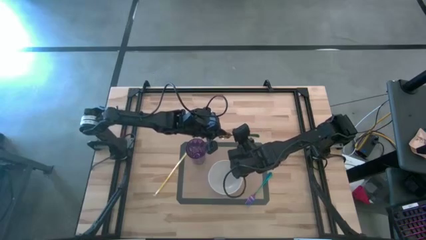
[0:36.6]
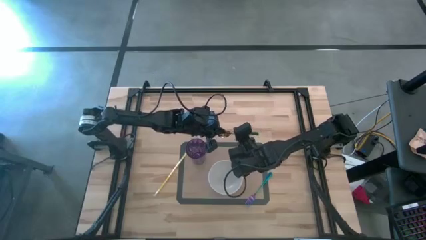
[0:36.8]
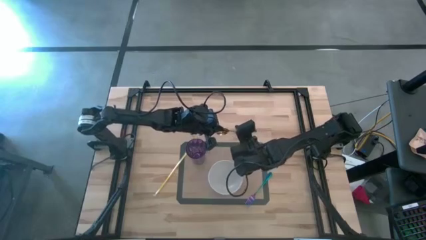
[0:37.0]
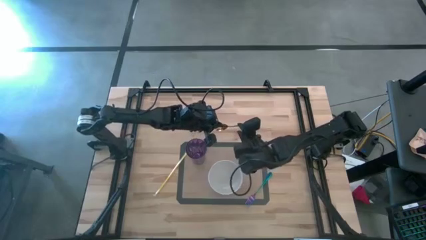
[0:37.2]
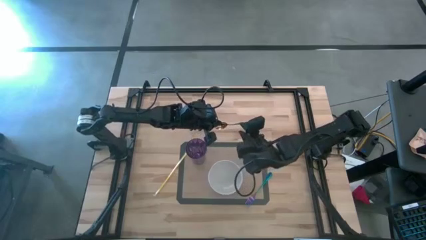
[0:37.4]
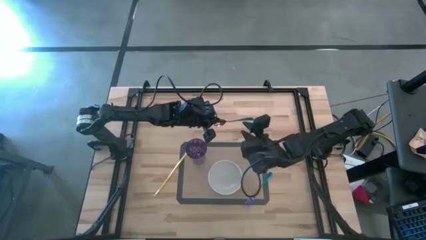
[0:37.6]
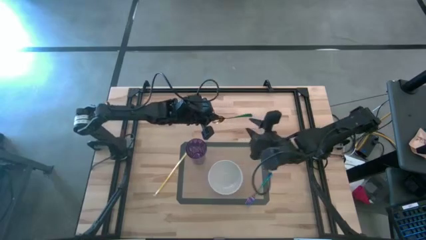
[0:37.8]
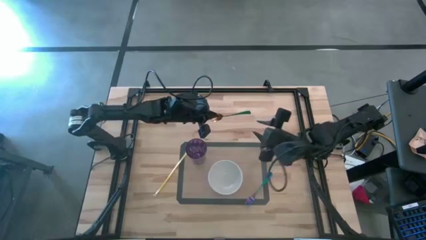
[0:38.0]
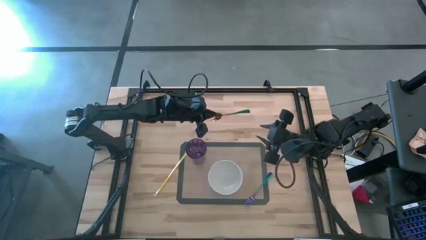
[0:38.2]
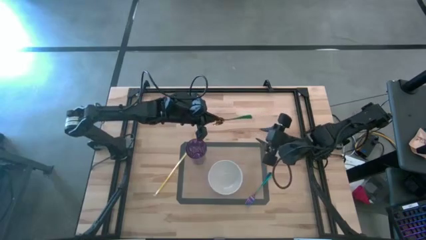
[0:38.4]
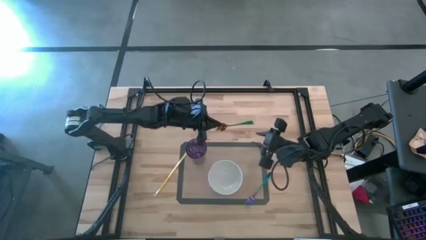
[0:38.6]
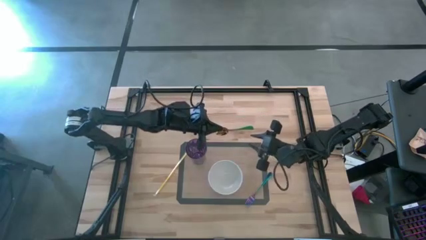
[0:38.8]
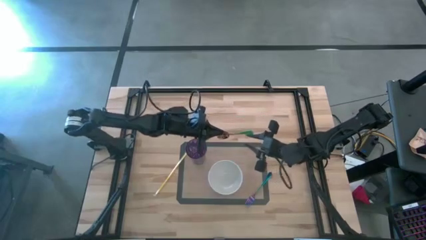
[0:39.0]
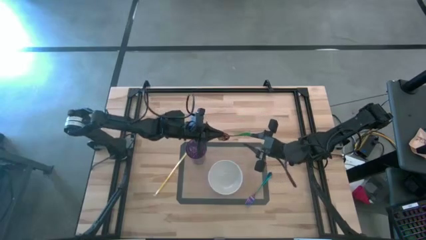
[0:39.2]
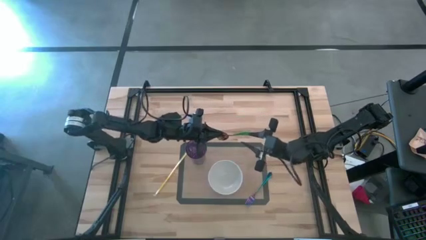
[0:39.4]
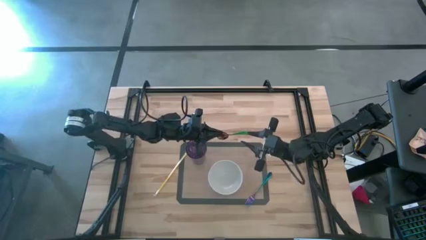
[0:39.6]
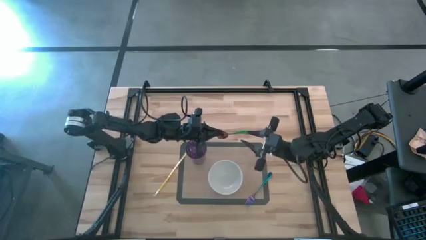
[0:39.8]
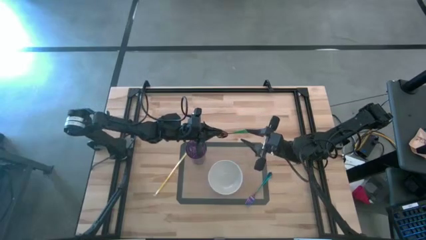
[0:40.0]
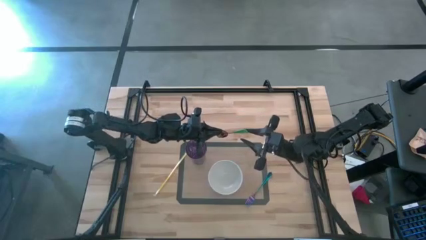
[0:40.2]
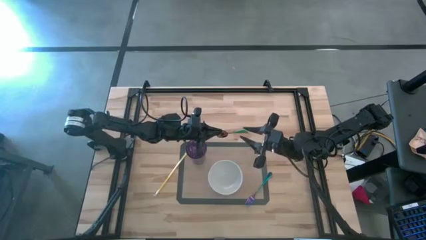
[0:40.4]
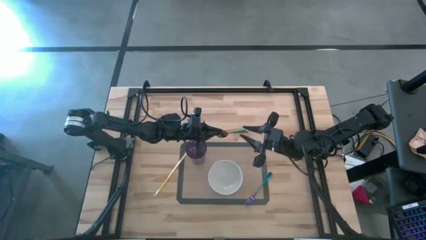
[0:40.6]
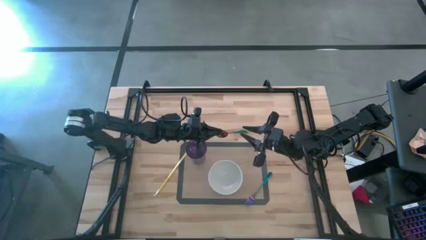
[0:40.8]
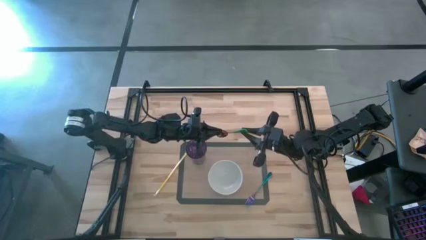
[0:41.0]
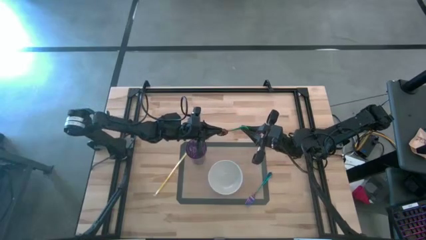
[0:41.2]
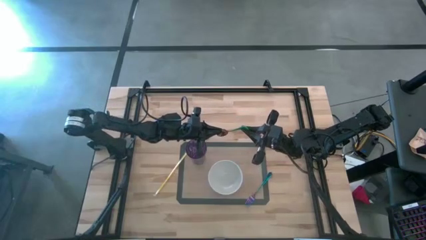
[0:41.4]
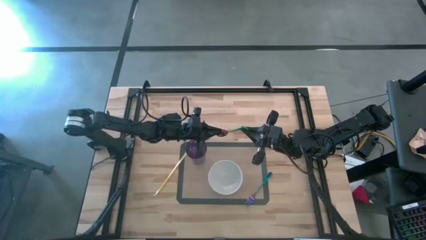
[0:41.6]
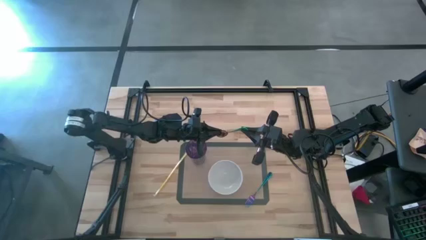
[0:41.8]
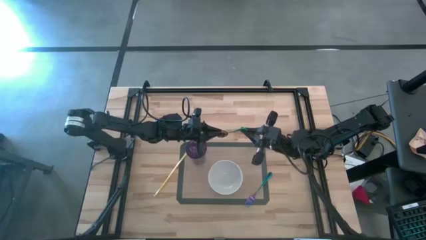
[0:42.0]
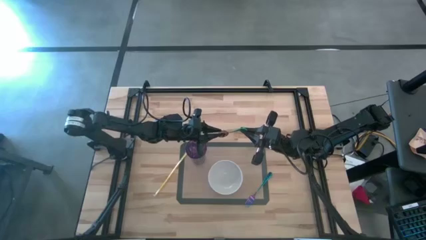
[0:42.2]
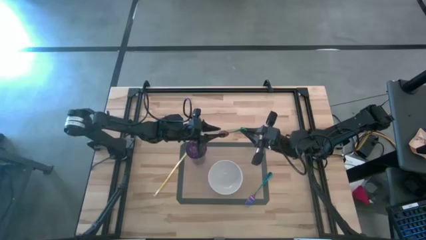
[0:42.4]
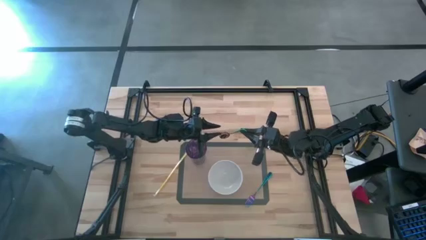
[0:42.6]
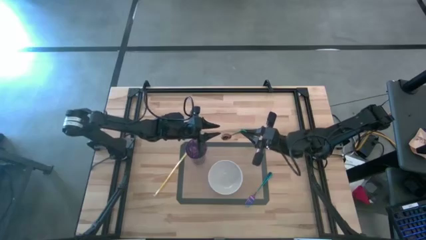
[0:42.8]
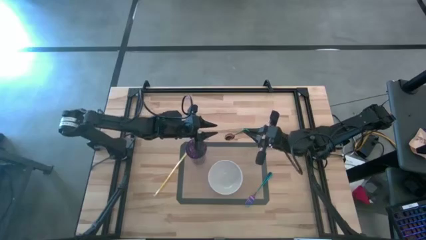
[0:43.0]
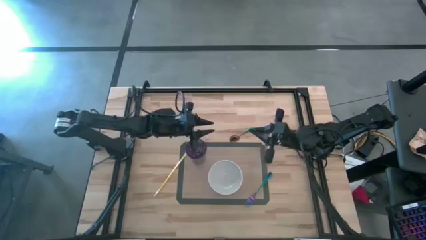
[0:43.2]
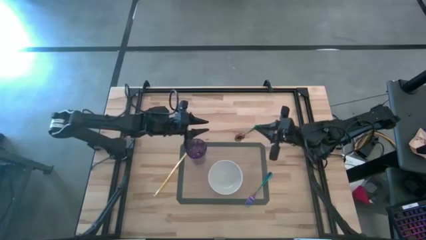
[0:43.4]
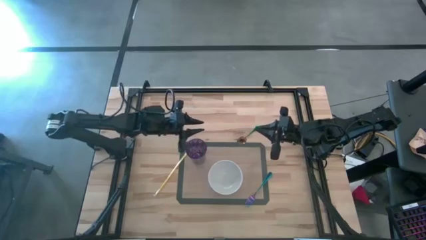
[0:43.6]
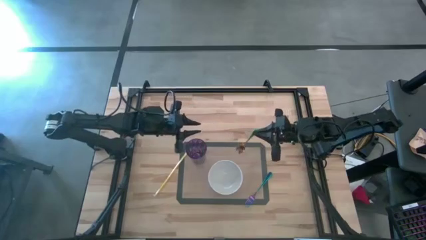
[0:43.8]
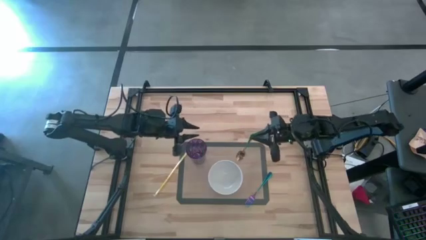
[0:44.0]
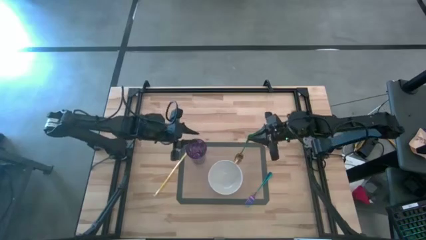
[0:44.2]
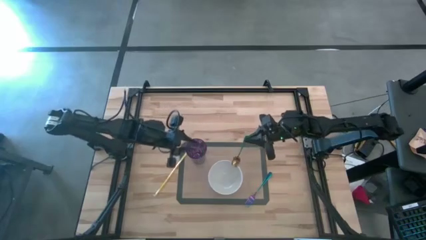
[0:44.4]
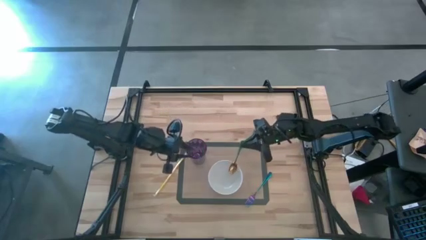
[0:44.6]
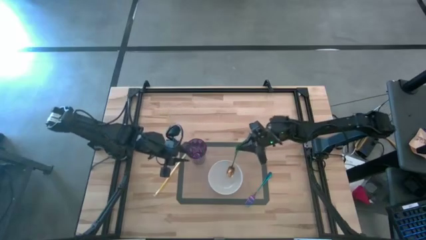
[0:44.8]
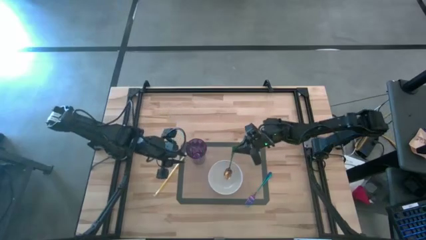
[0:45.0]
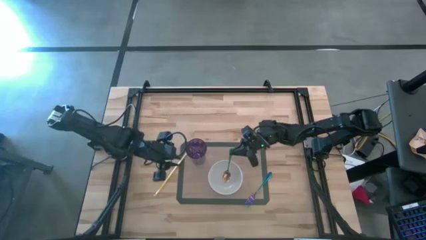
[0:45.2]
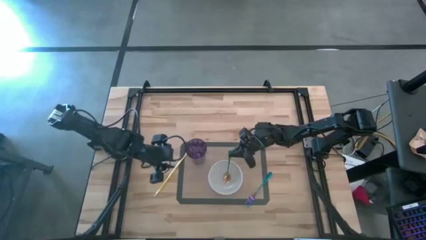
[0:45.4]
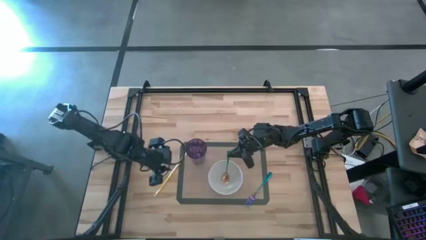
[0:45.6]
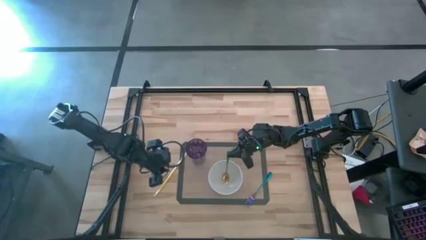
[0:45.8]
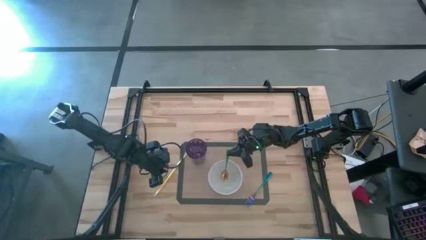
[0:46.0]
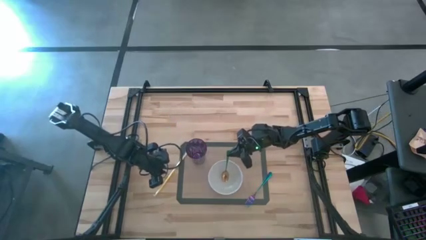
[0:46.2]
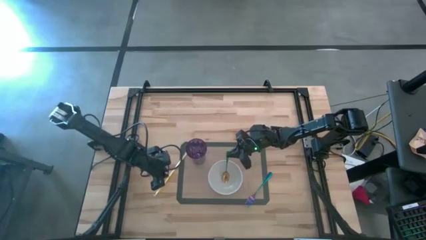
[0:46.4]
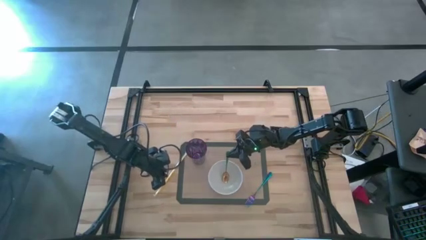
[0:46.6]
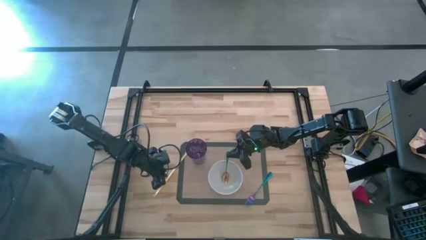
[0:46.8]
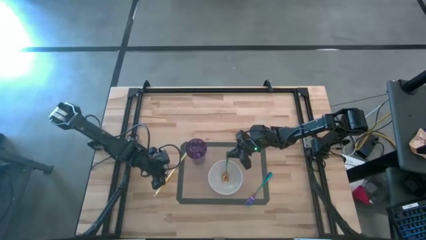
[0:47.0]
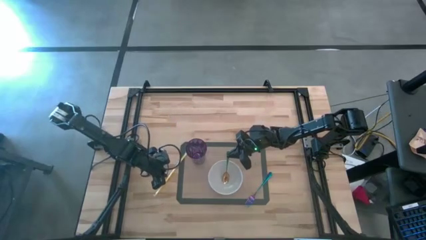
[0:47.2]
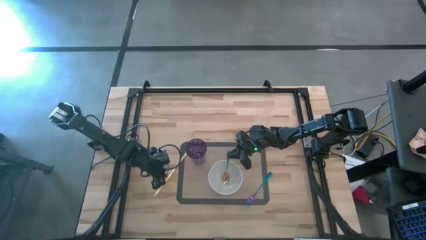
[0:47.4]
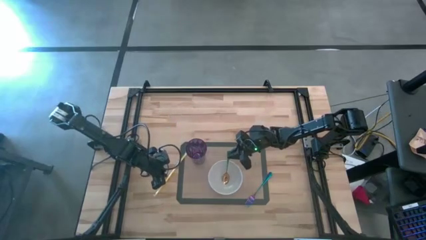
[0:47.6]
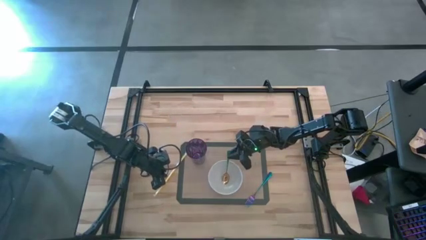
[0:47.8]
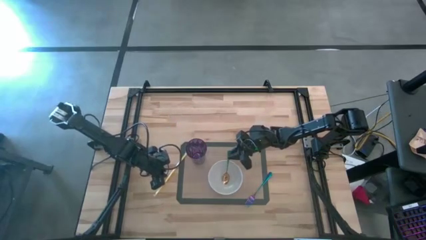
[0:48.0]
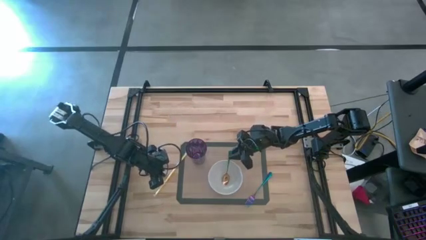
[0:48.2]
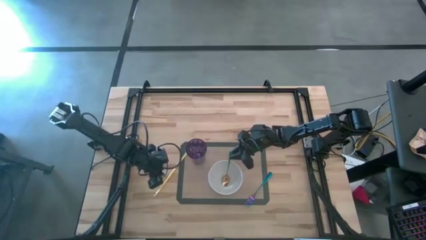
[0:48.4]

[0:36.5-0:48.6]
Task: Pick & Place Utensil
Put the green spoon on the white bowl

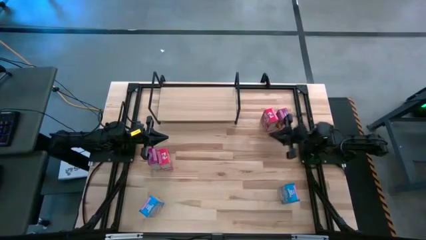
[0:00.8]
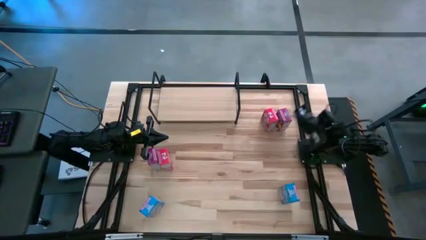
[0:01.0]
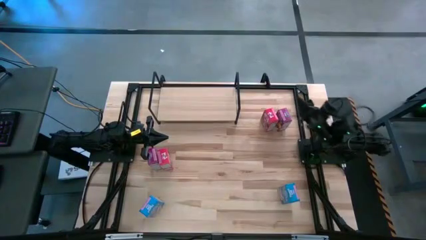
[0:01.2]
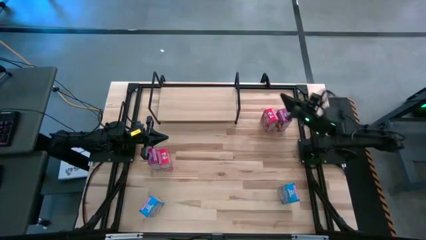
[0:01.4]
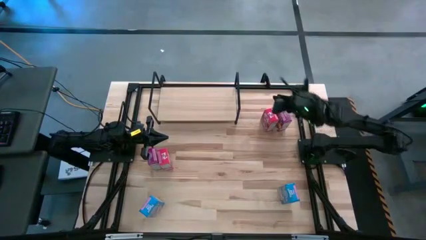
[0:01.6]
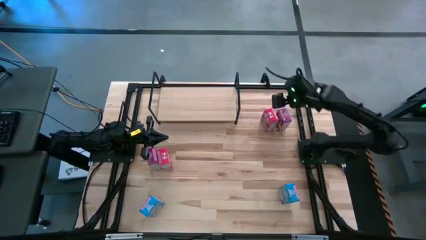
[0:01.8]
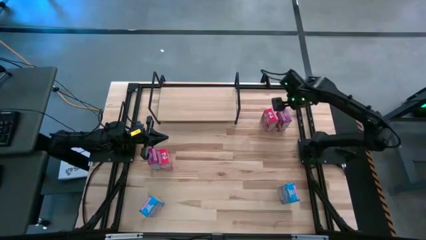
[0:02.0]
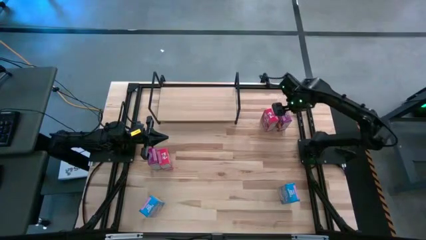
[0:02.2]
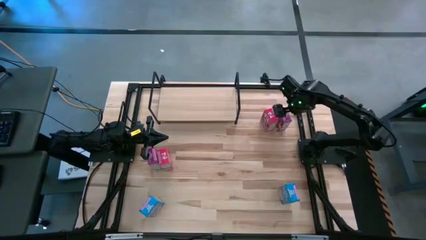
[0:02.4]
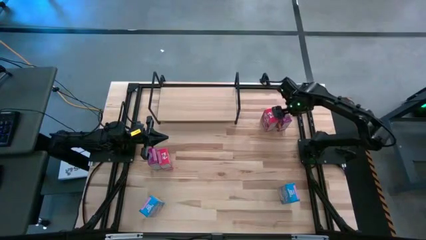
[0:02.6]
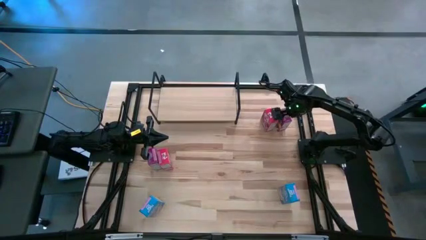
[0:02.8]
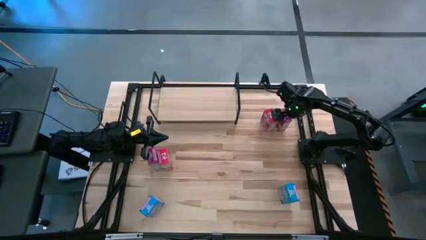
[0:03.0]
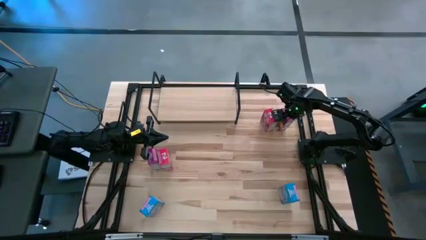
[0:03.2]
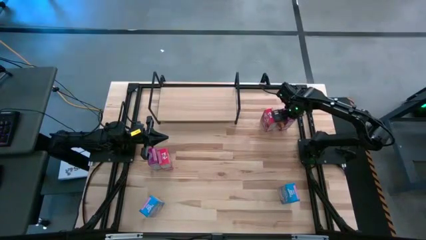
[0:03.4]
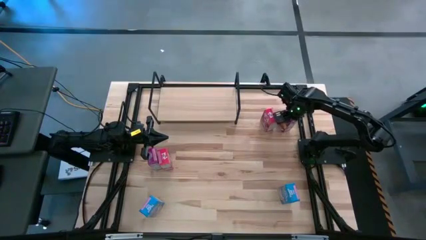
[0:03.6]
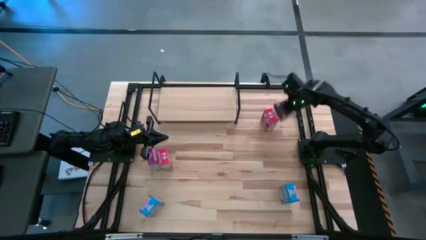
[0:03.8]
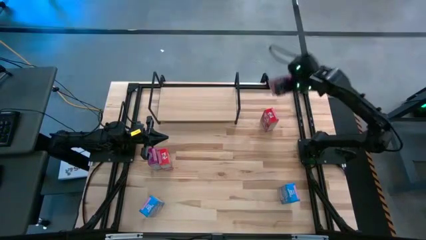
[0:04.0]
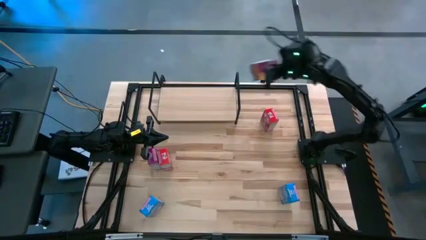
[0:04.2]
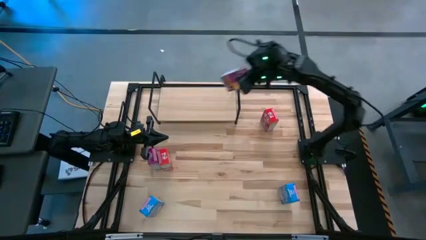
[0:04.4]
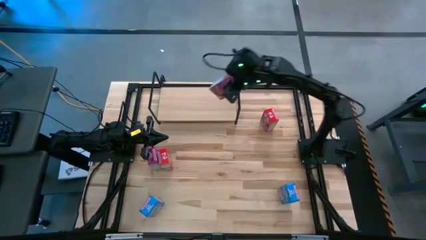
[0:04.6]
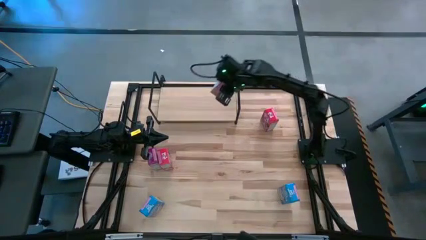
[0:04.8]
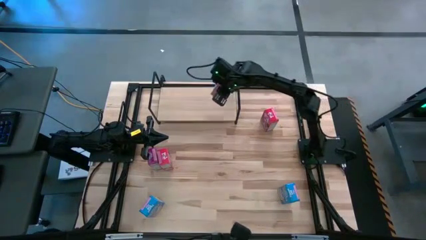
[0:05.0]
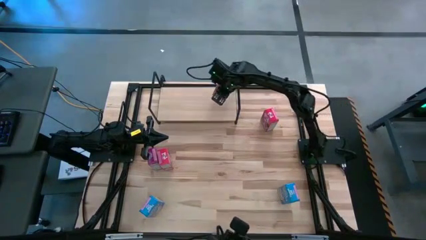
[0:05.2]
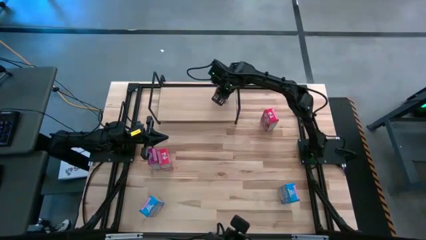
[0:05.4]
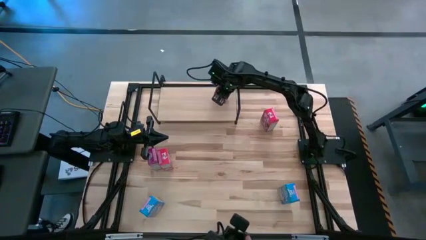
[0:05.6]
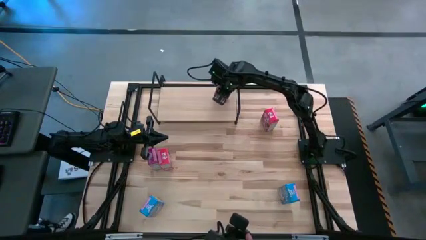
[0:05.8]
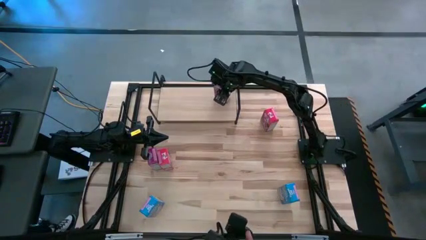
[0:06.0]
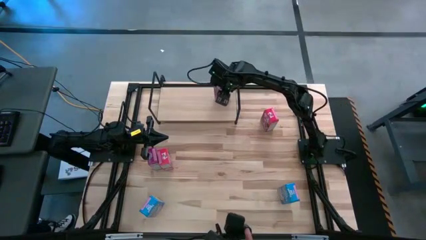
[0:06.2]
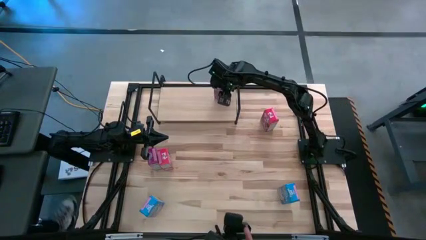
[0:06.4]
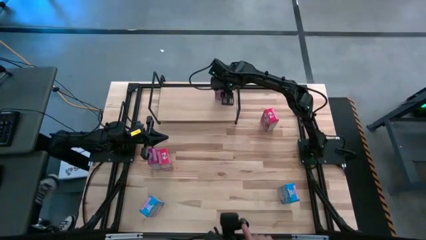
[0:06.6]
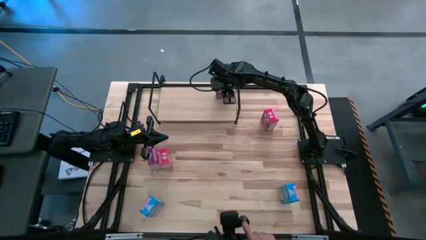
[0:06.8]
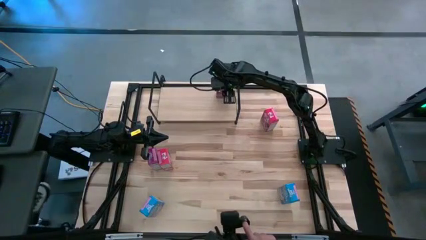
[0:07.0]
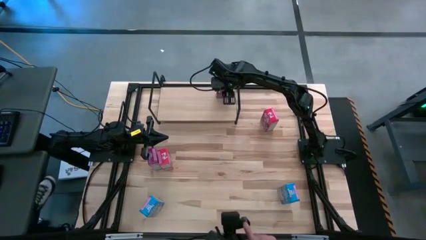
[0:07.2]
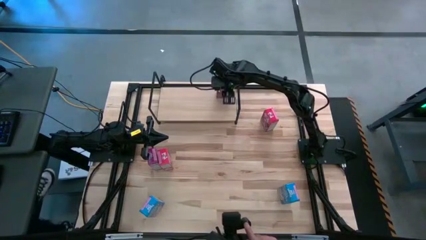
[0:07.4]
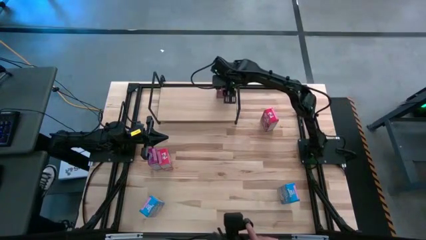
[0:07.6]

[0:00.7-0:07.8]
Task: Stack cereal on shelf
Put the right purple cereal box on the shelf
